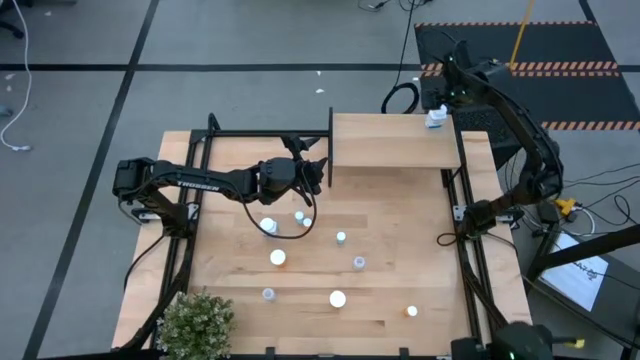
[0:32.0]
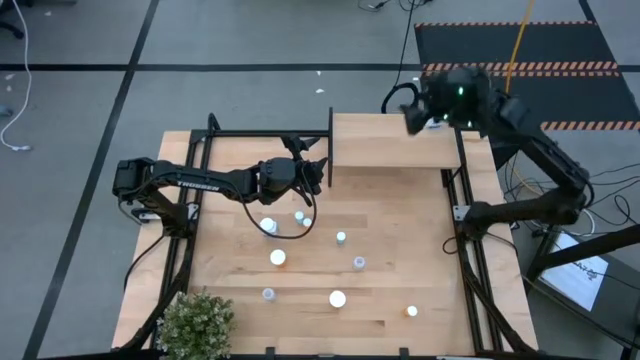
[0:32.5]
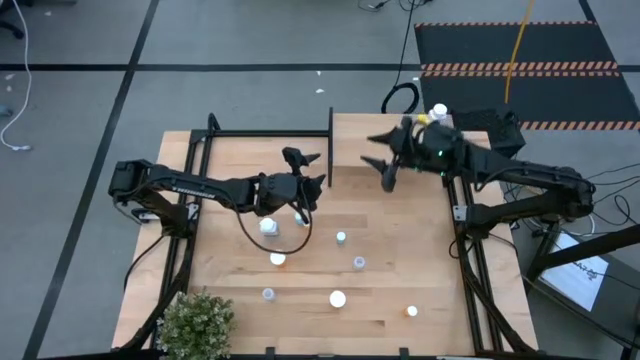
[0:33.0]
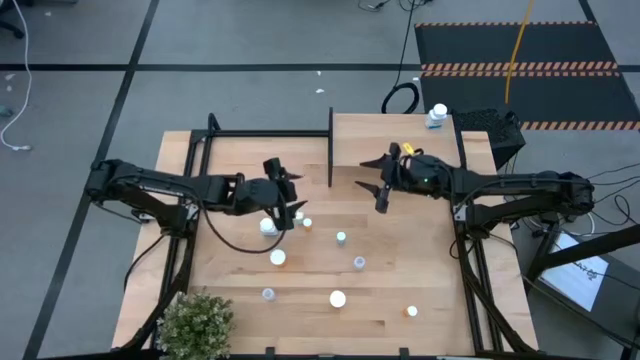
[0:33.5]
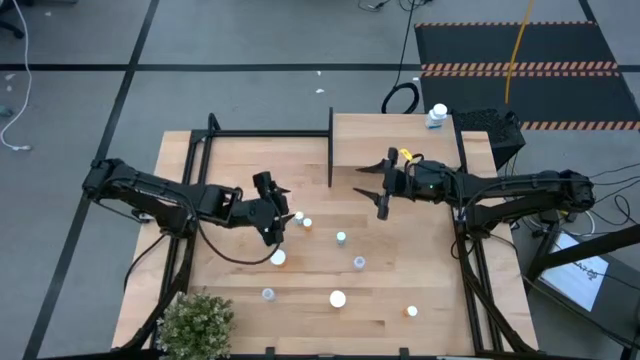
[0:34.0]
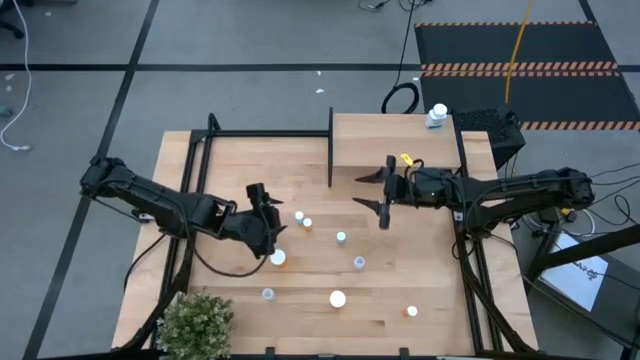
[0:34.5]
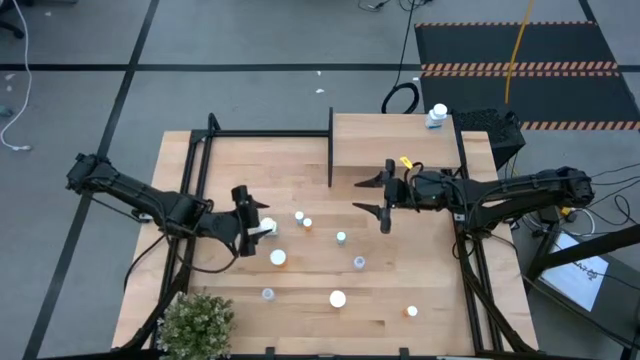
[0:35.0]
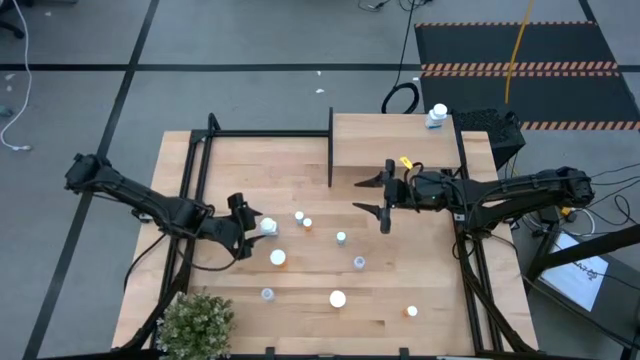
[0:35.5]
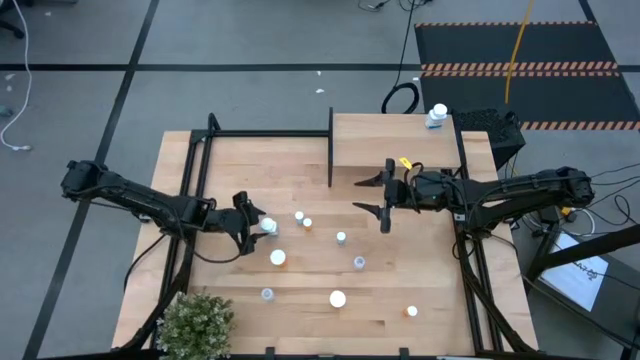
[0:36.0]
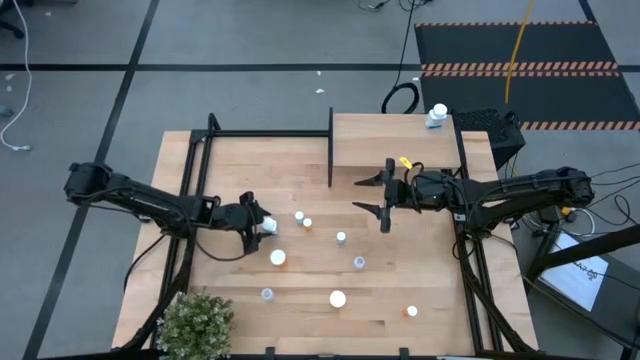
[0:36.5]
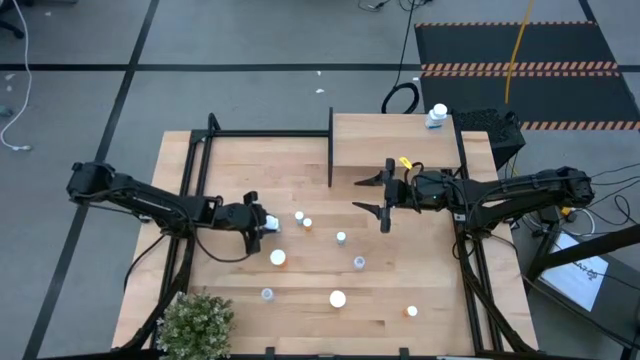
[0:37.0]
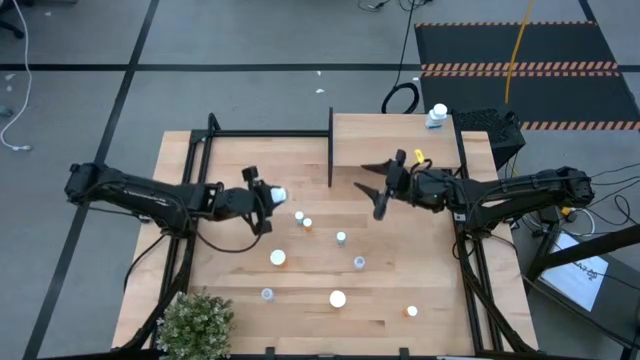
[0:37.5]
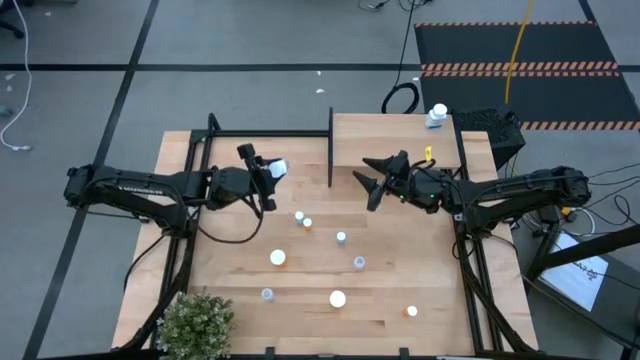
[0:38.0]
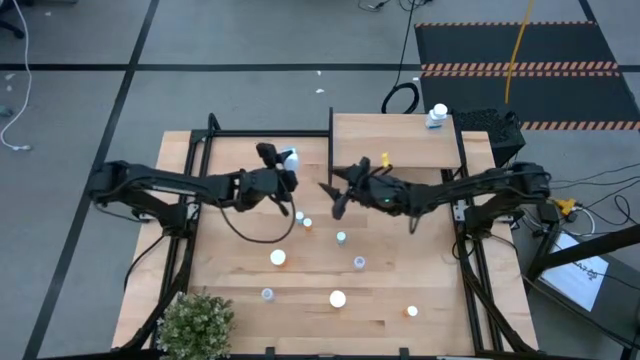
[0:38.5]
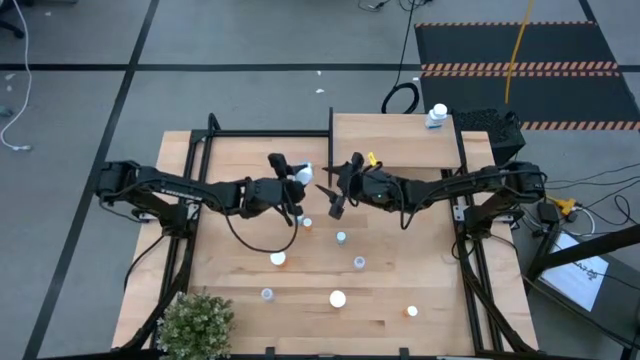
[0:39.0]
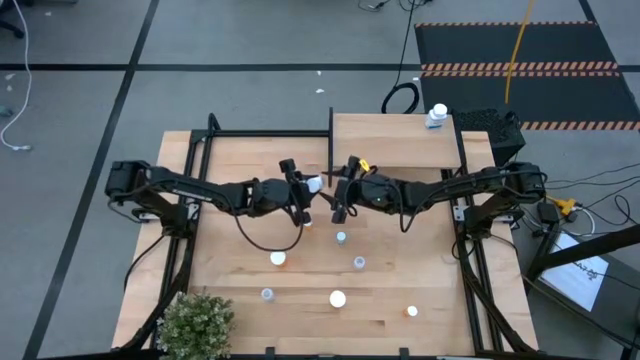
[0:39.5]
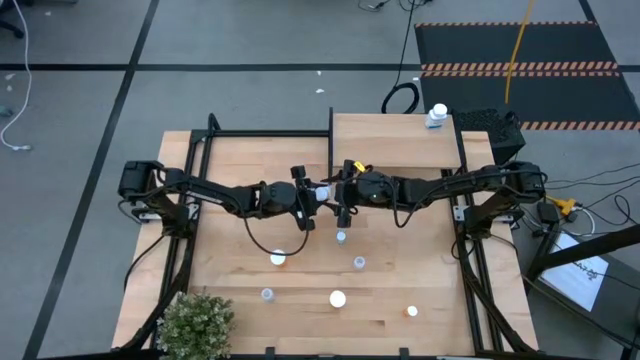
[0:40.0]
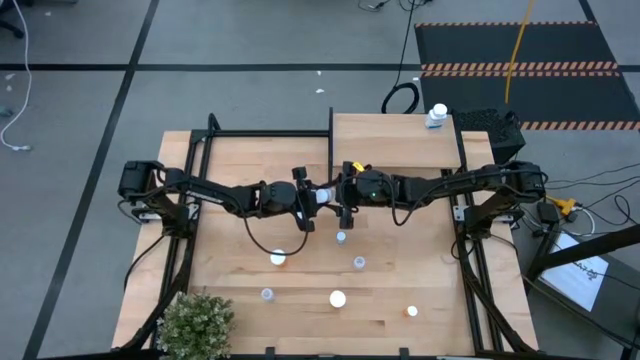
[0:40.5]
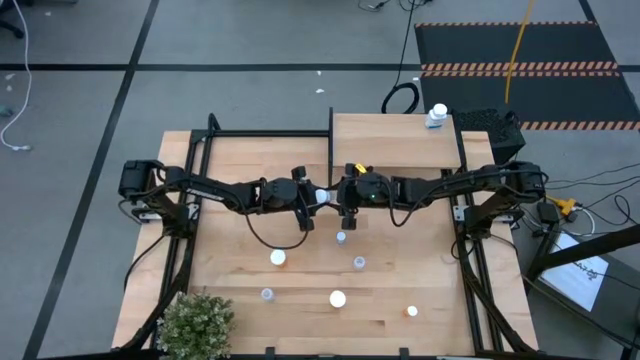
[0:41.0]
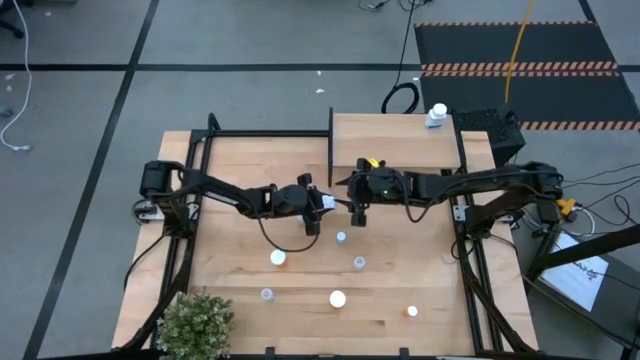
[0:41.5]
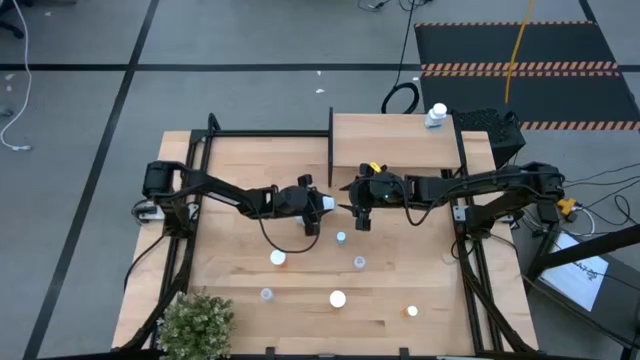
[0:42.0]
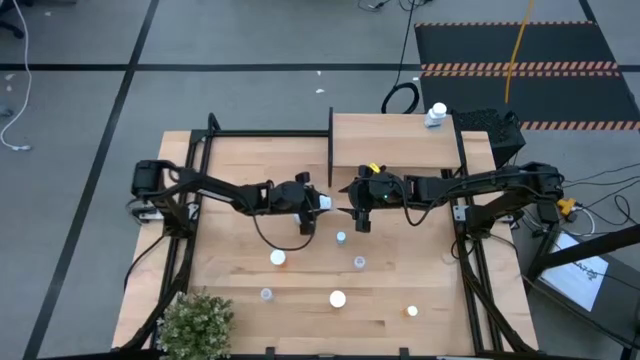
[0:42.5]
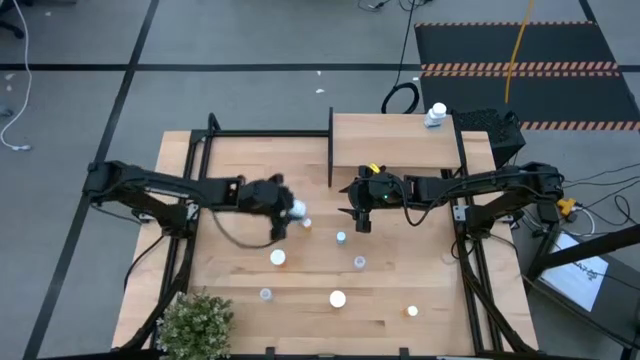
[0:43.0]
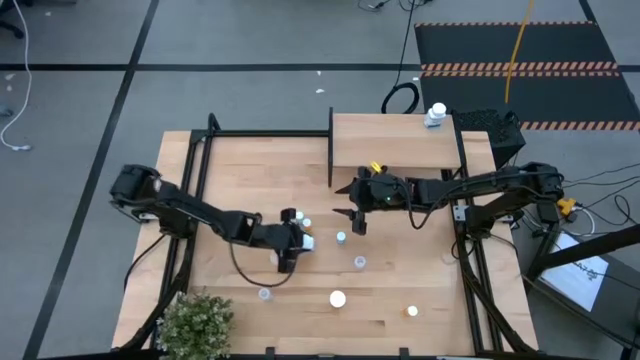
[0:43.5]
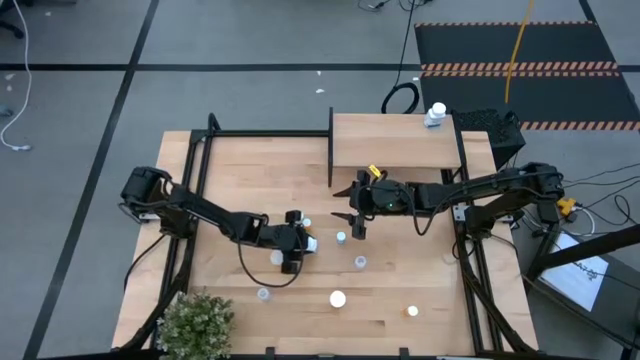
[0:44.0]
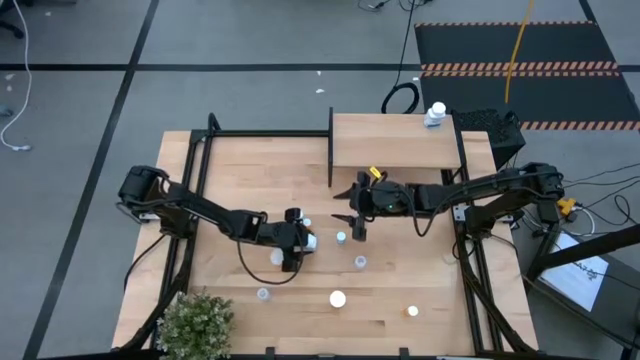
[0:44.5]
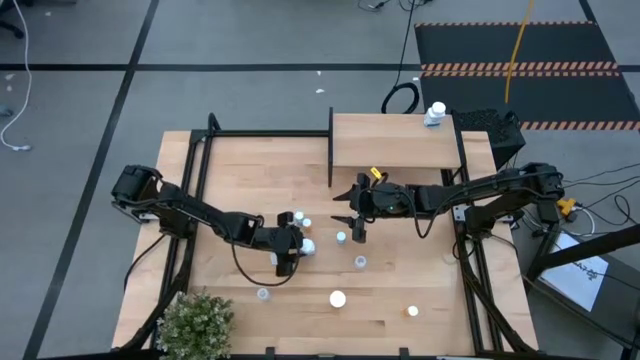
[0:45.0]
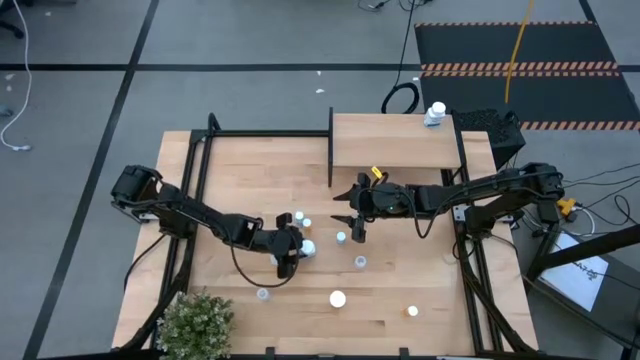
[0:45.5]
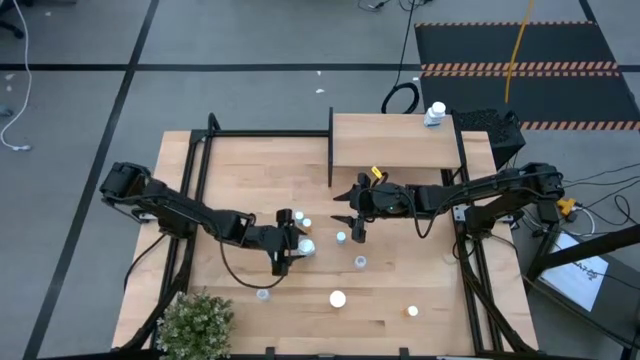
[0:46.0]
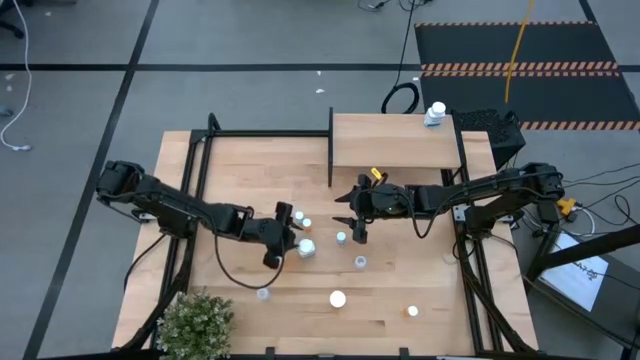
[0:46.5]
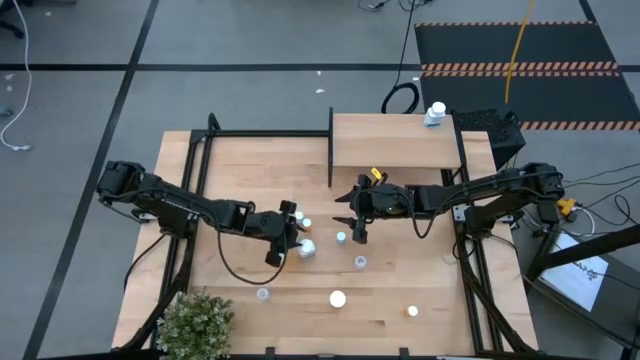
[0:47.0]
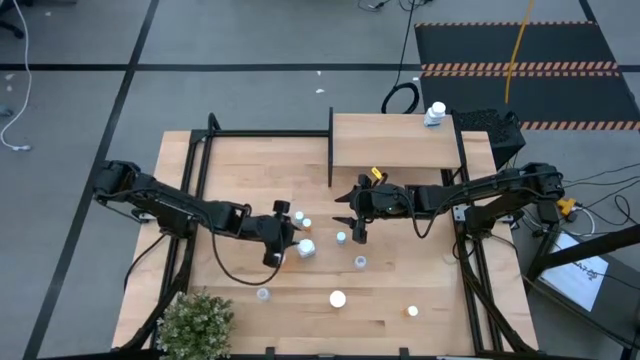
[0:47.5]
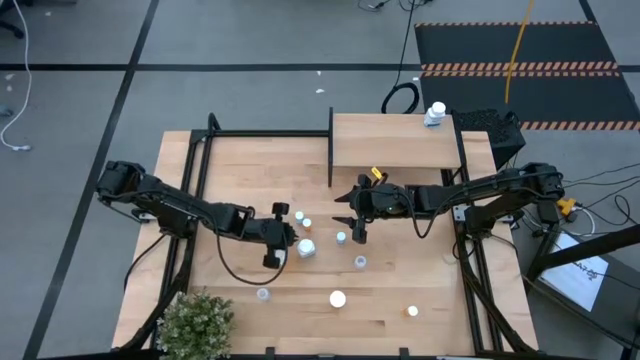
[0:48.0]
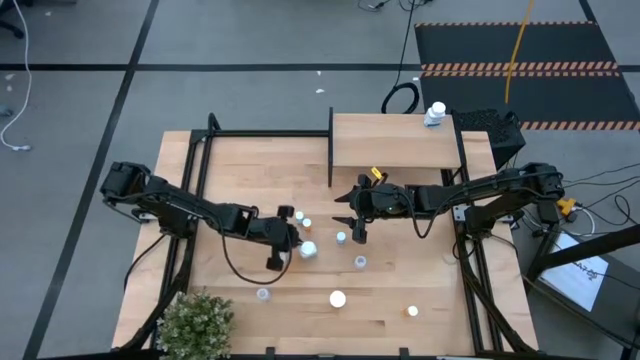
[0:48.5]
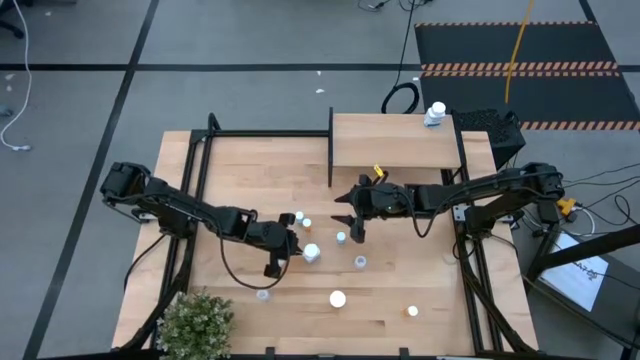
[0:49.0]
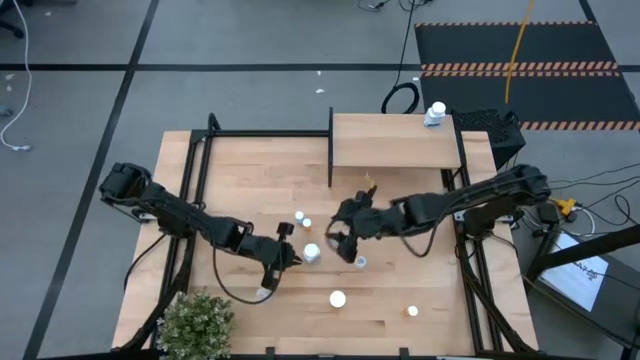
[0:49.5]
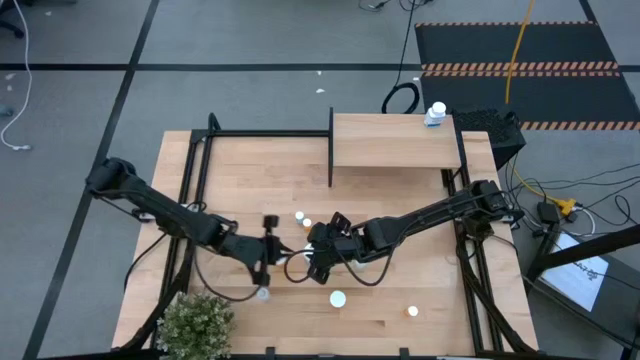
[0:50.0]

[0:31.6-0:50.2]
Task: Pick and place medicine bottles onto shelf by color
Put the white pill bottle on the shelf aligned with the other white pill bottle
